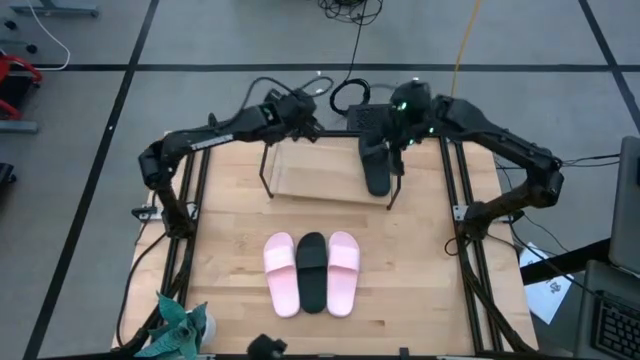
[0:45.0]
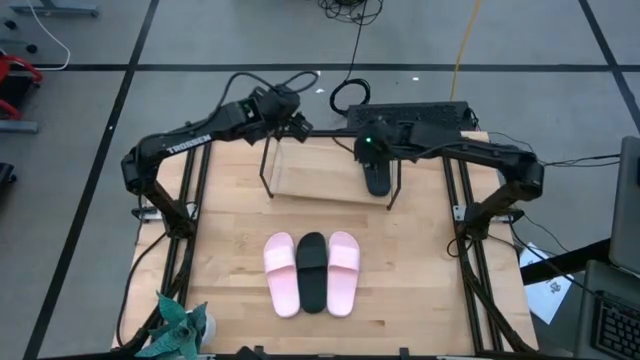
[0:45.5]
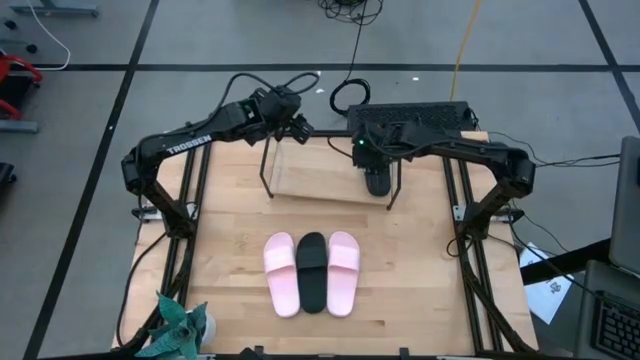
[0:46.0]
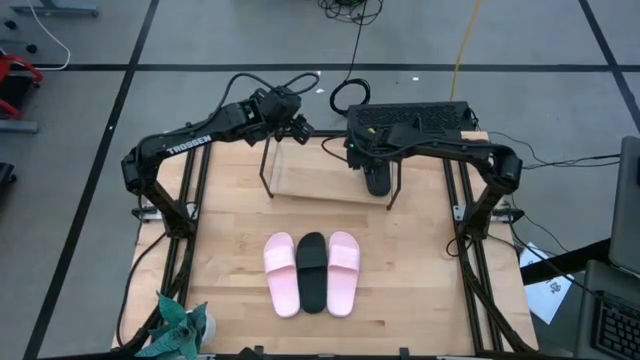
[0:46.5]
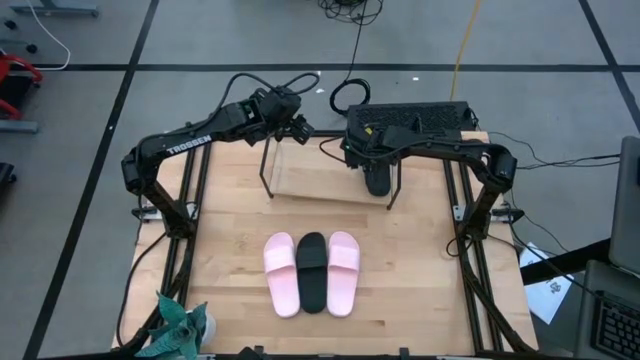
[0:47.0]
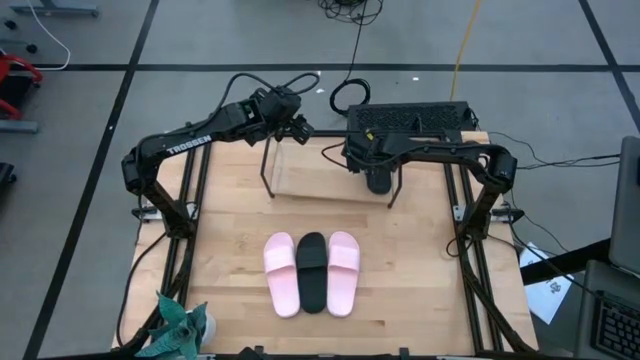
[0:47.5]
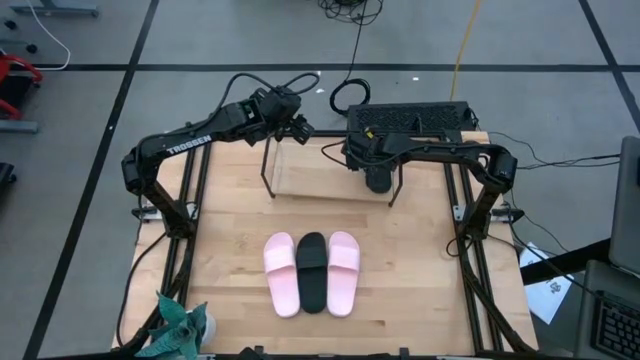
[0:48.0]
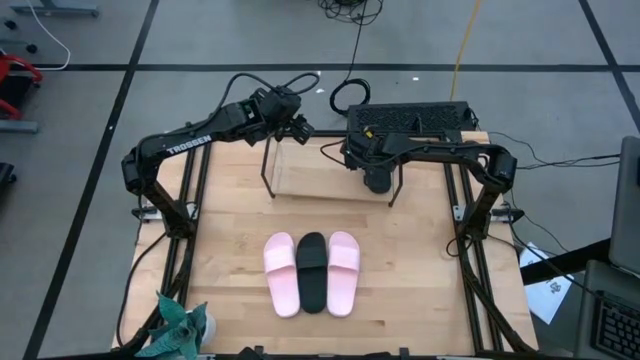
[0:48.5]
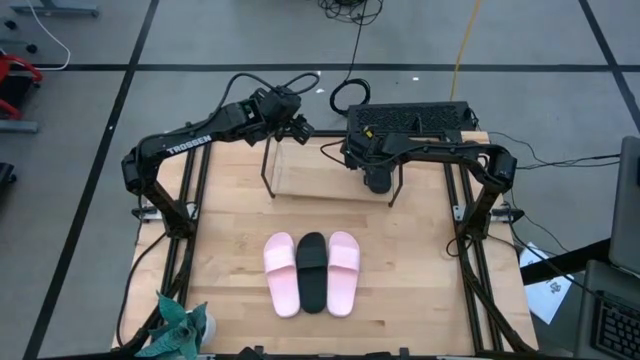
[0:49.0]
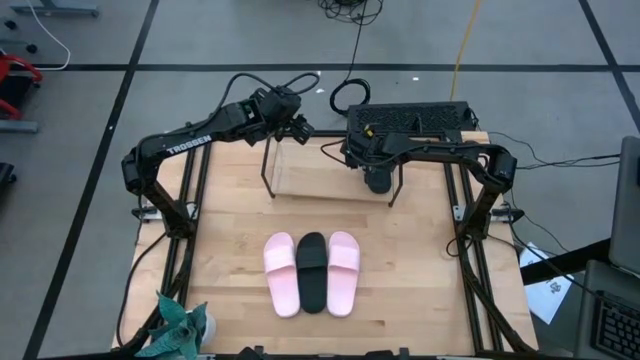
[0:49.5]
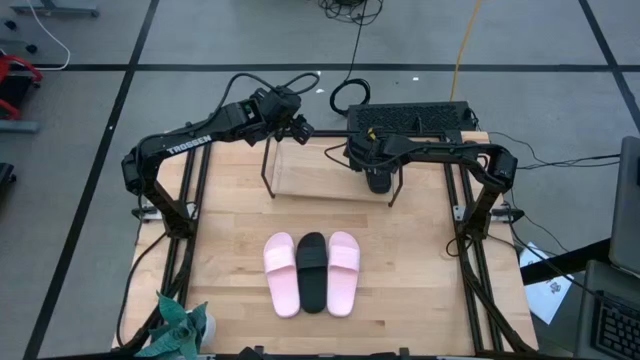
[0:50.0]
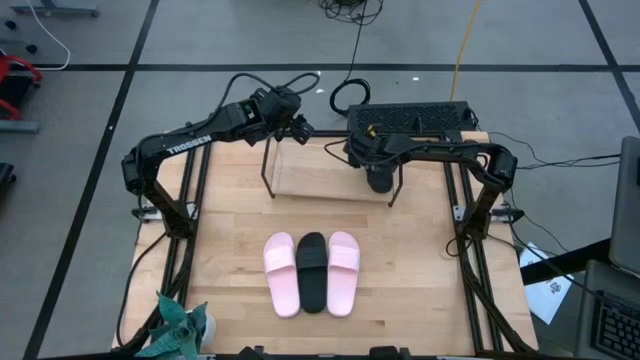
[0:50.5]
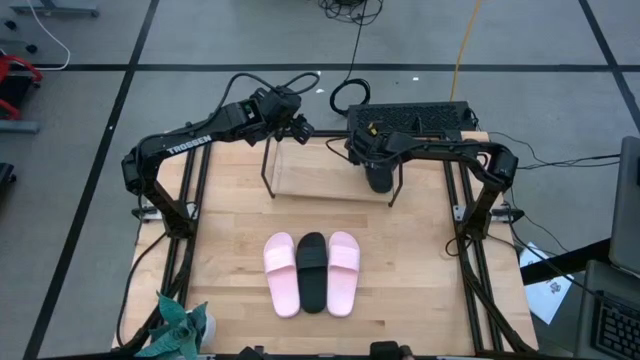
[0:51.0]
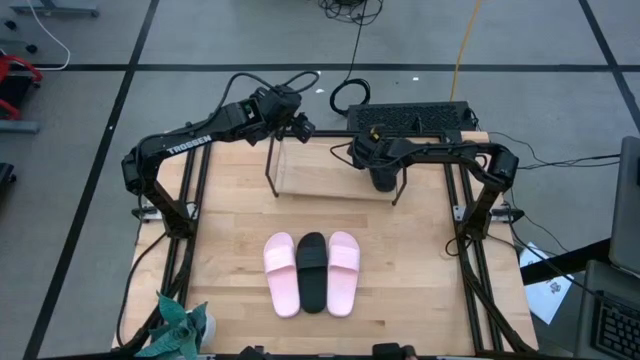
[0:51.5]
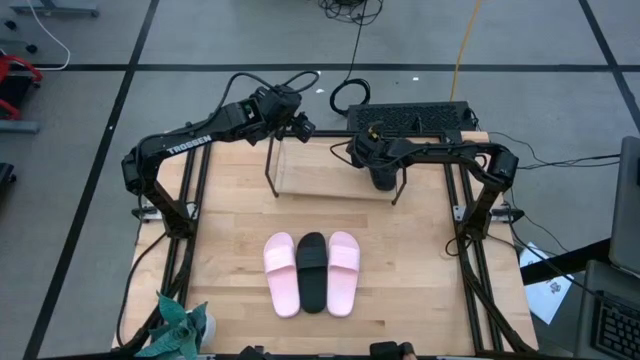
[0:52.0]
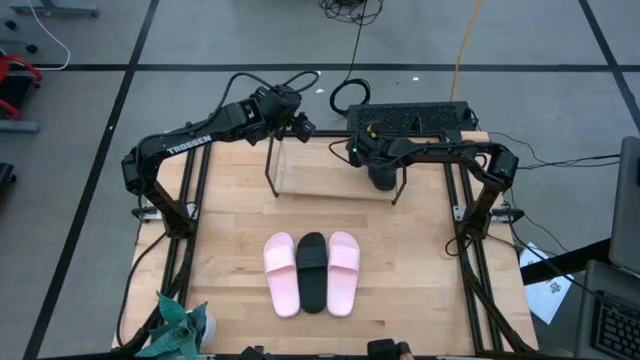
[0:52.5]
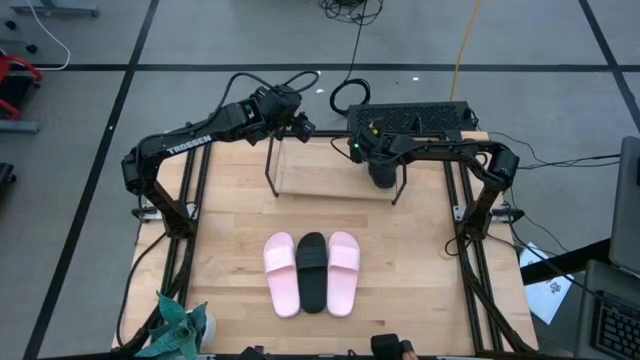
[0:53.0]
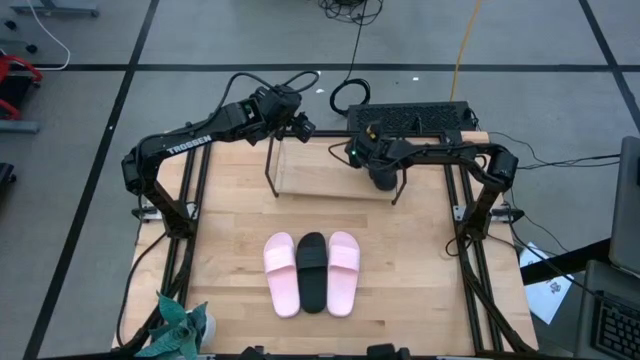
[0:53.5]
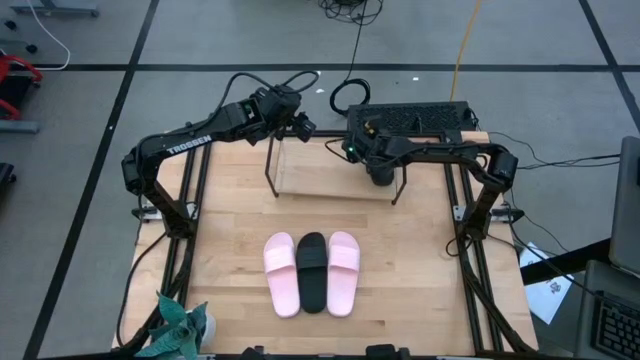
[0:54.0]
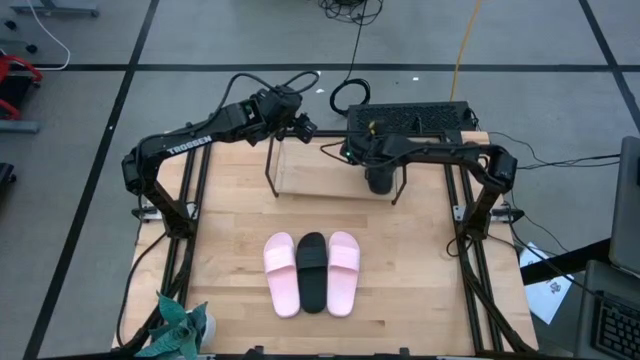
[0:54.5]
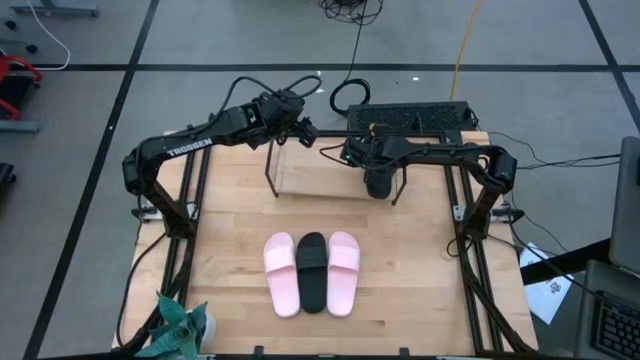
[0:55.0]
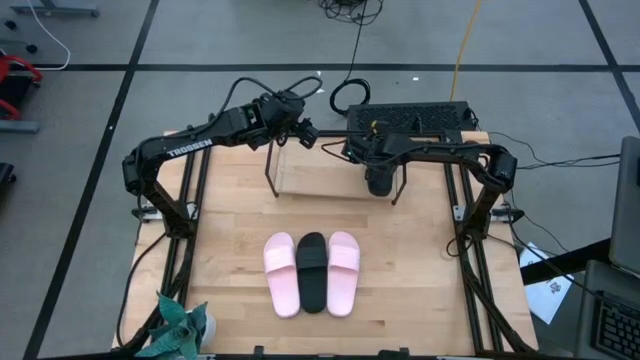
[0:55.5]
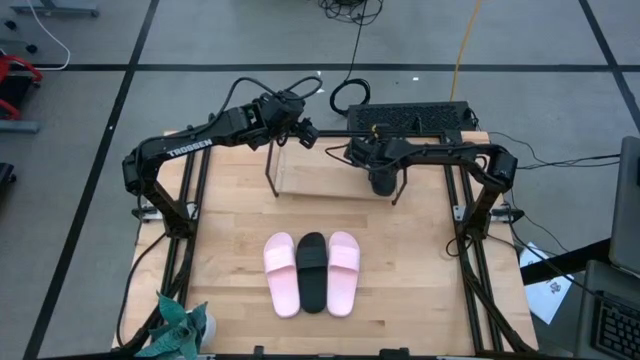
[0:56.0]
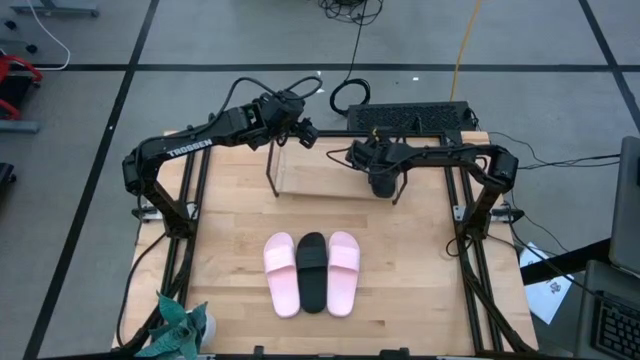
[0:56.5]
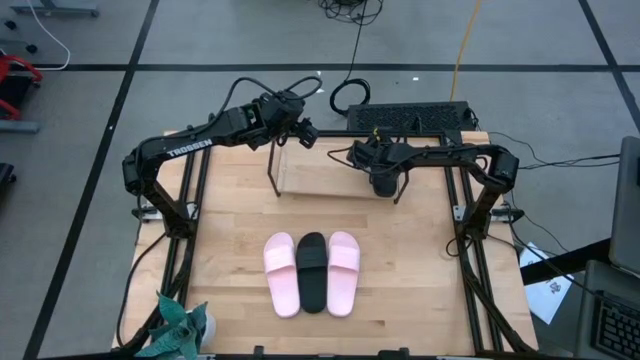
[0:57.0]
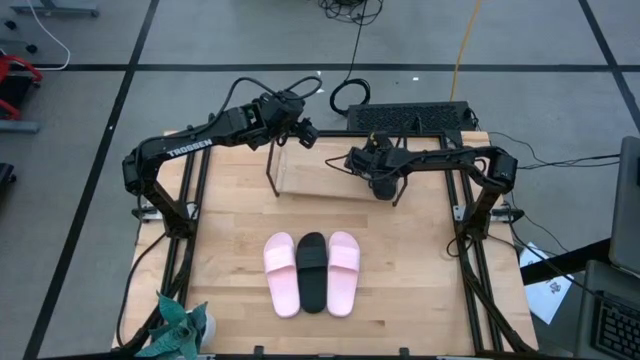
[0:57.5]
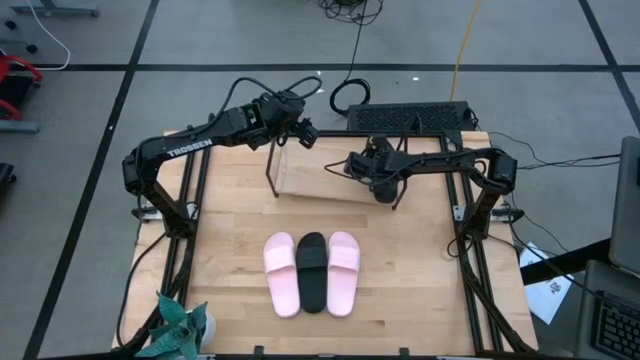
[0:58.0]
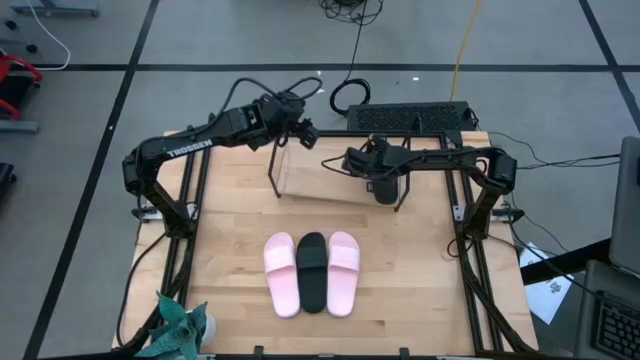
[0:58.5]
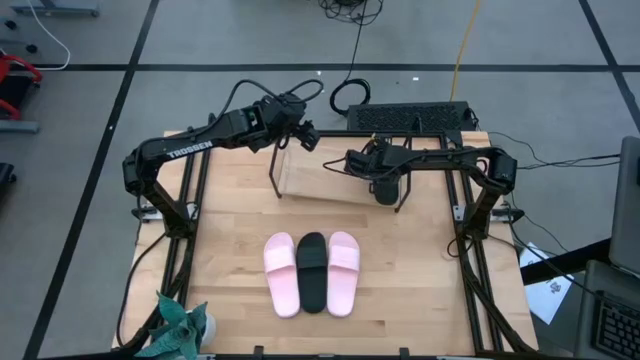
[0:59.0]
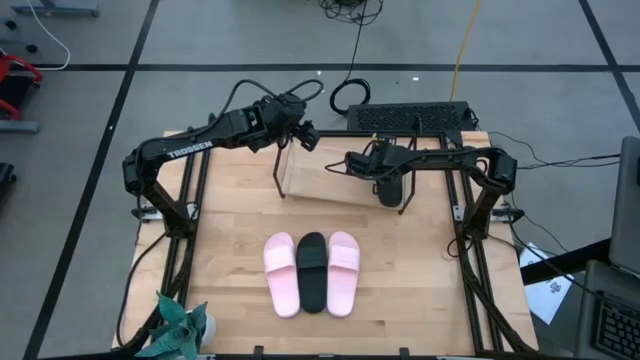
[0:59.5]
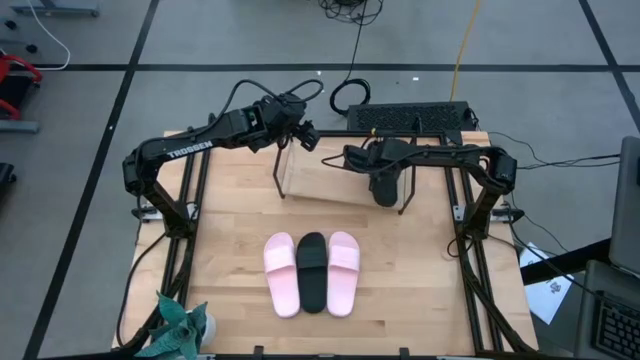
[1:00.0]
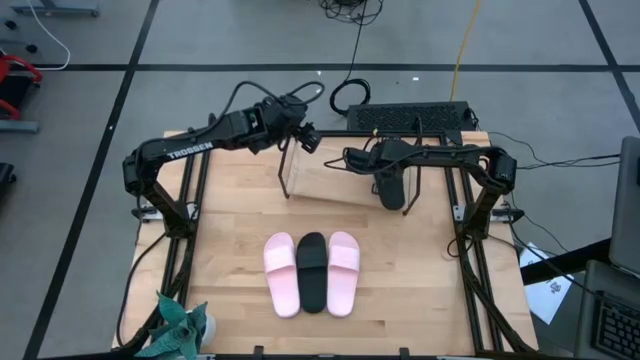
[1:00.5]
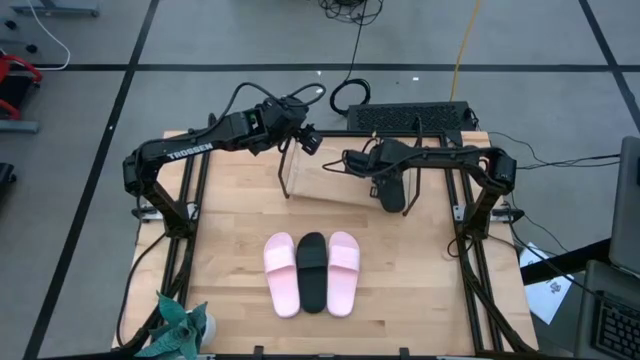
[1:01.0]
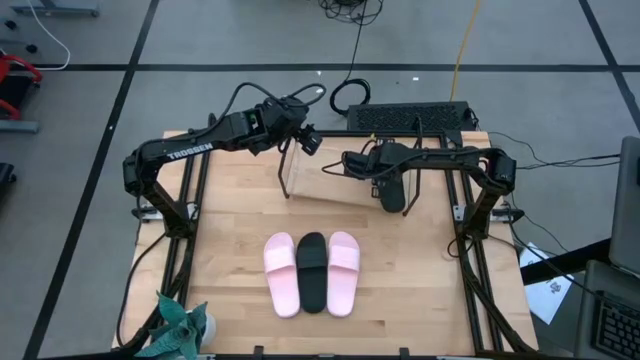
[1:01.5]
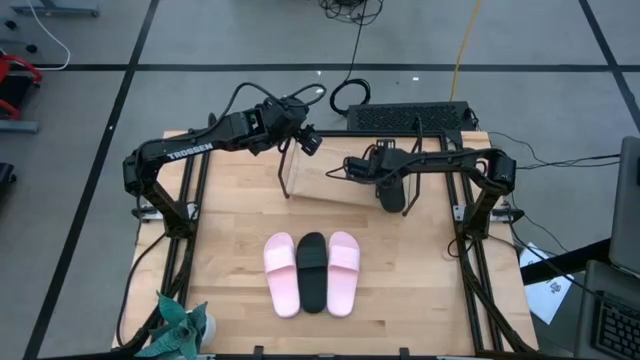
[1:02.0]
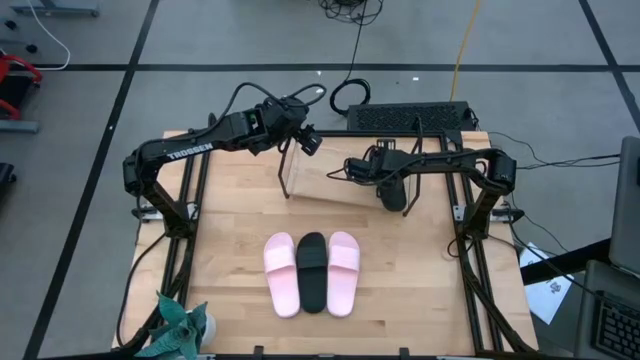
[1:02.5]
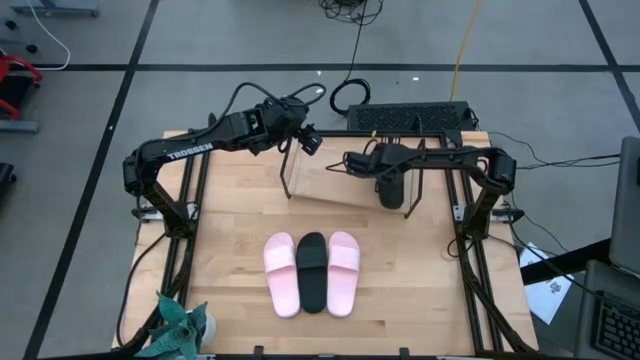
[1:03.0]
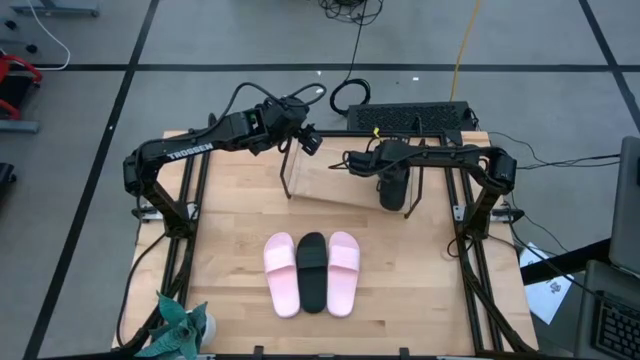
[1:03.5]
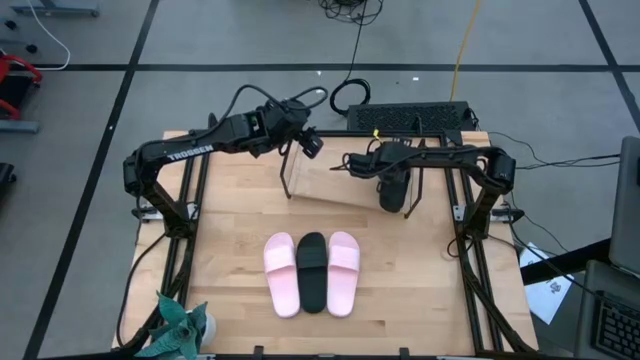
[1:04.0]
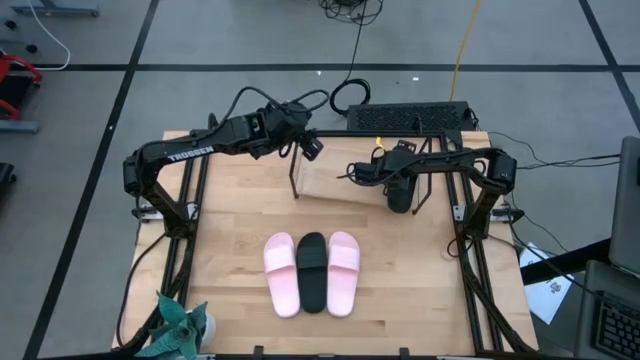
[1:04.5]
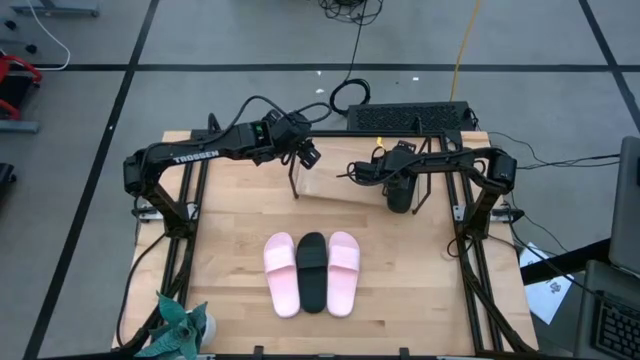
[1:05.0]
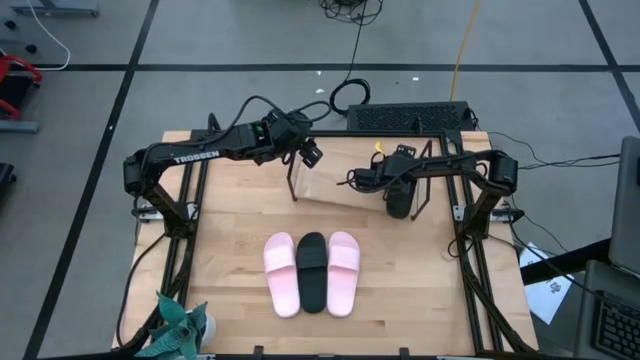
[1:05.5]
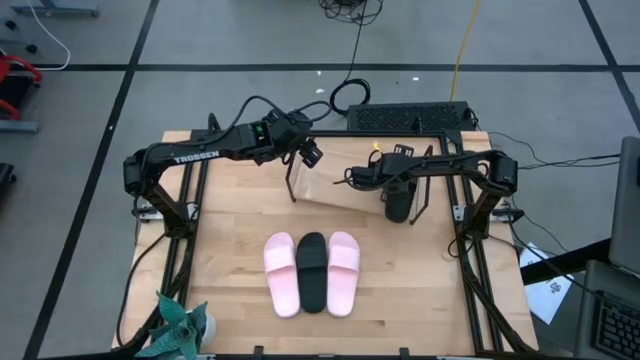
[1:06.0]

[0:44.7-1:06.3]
Task: Pick and place slides into the shelf
Put the right black slide on the shelf
